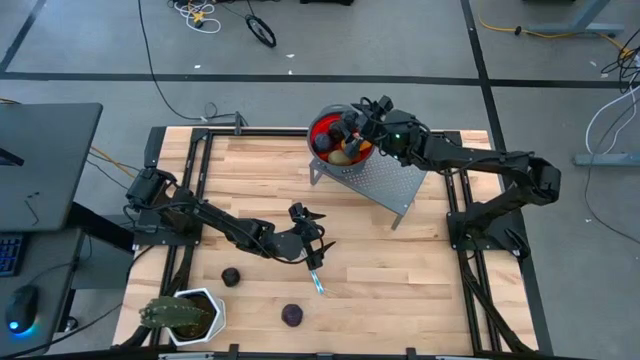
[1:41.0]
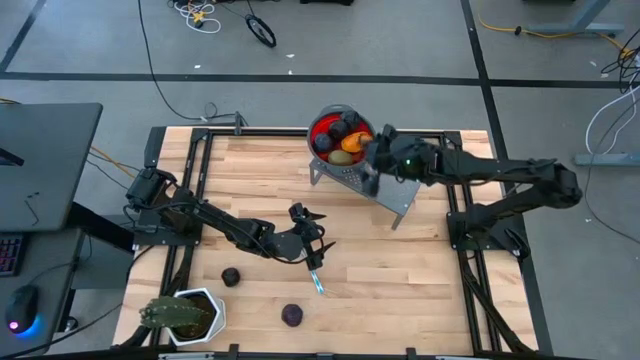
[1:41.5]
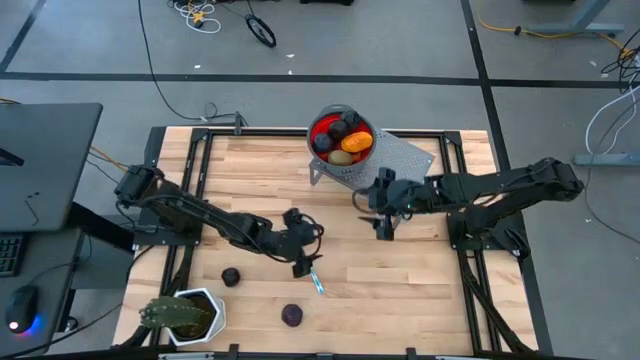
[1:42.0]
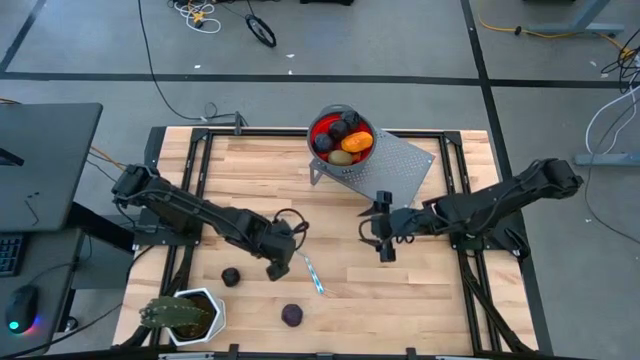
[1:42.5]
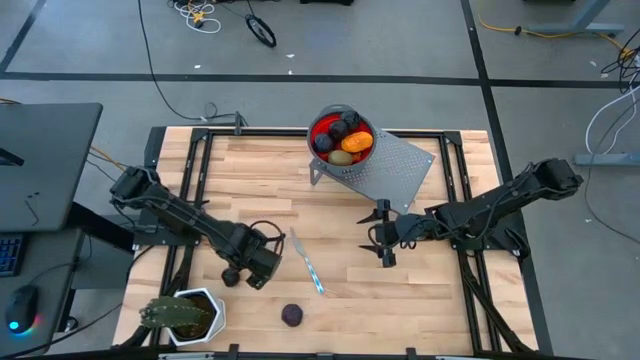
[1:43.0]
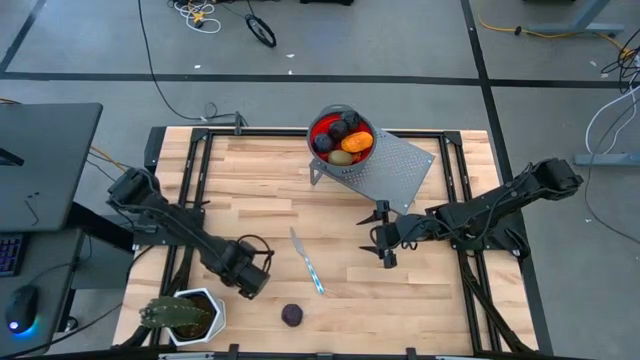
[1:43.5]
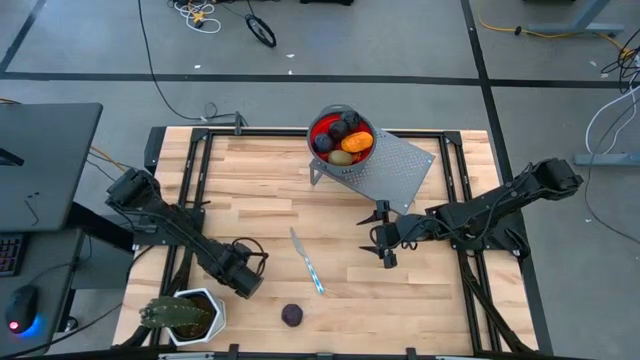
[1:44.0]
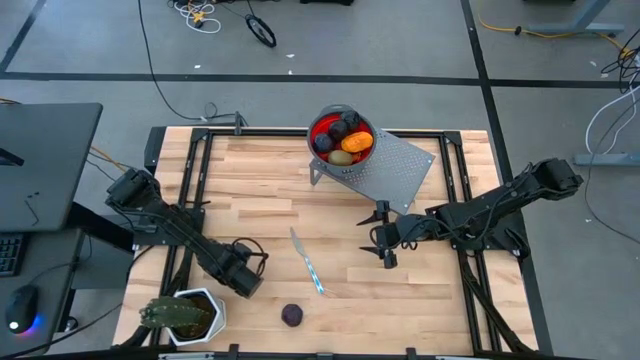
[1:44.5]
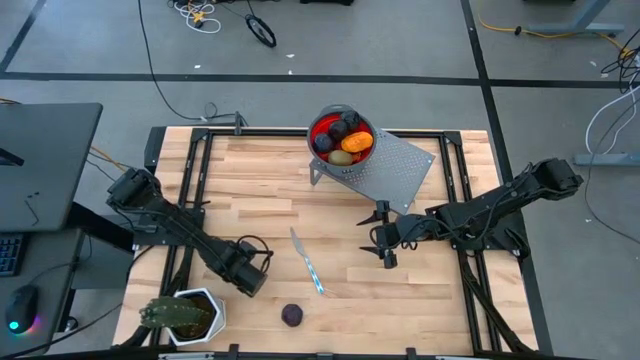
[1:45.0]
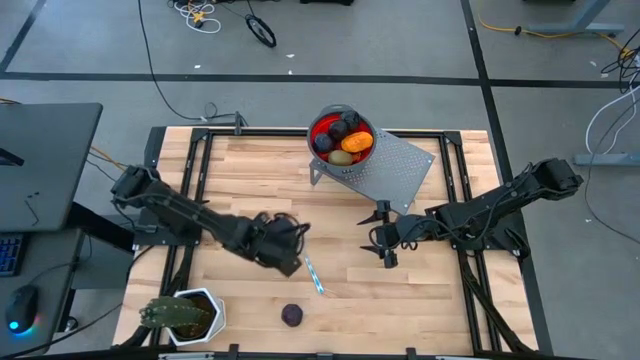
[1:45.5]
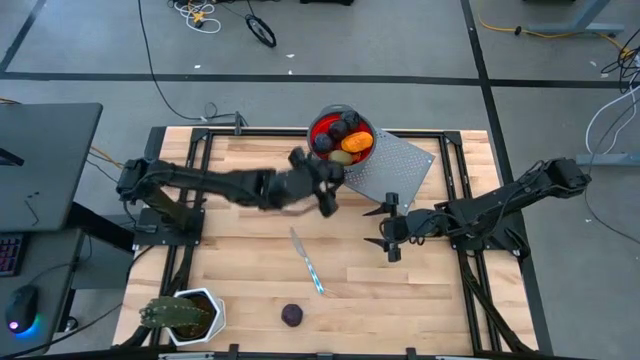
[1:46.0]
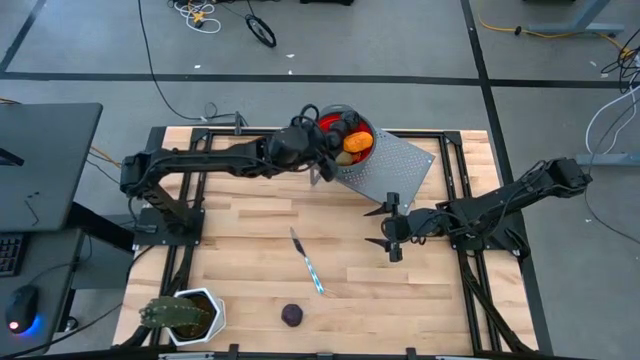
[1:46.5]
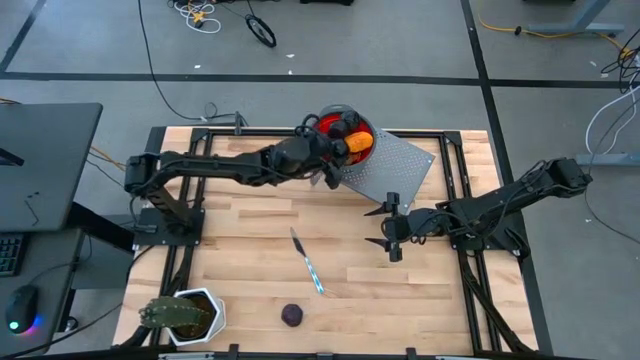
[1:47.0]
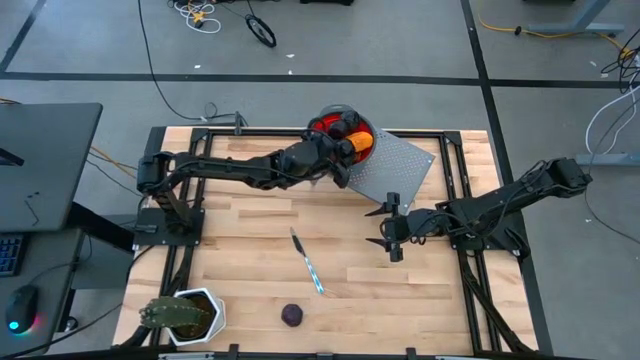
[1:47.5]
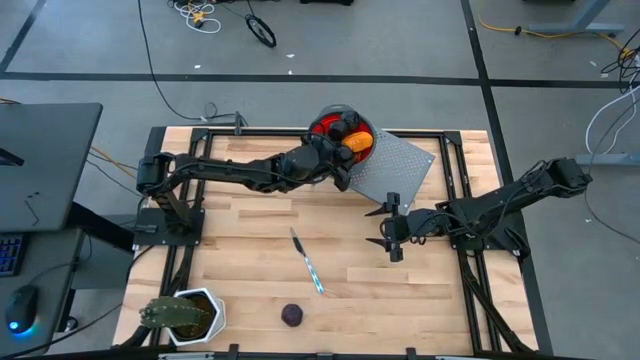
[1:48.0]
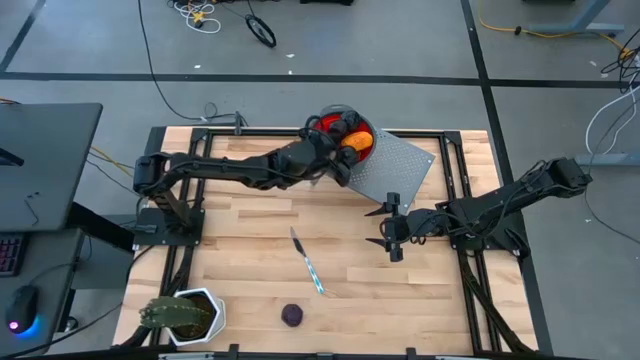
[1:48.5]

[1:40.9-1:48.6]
Task: Pick & Place Fruit
Put the mangosteen into the red strainer bowl

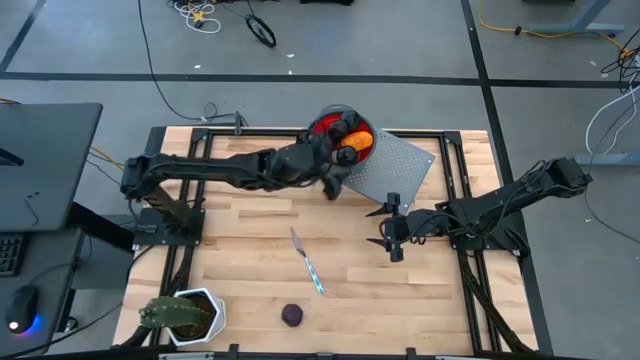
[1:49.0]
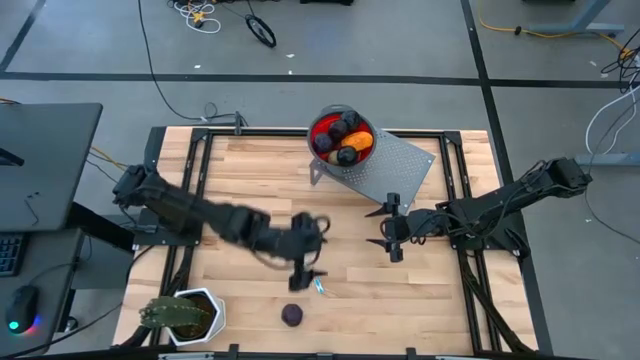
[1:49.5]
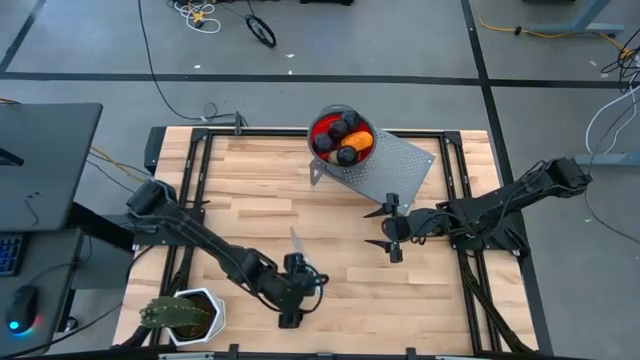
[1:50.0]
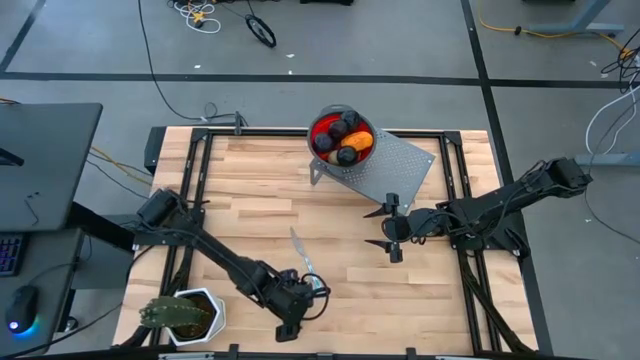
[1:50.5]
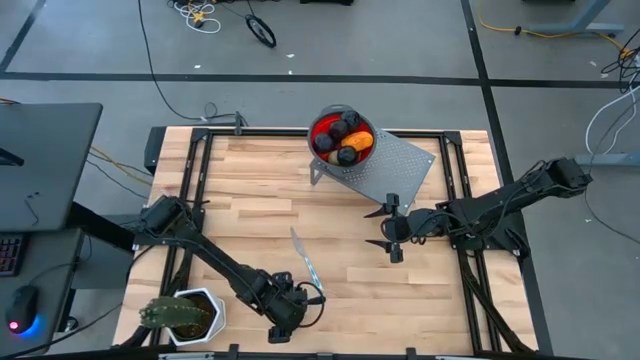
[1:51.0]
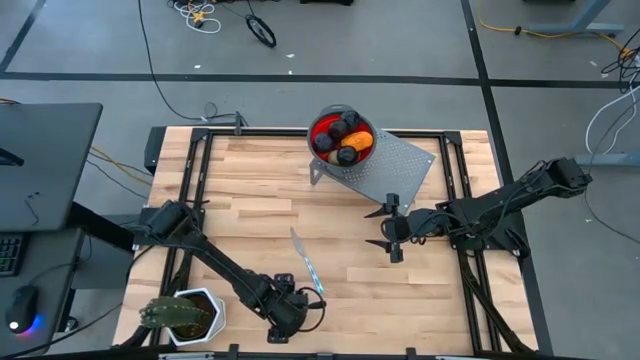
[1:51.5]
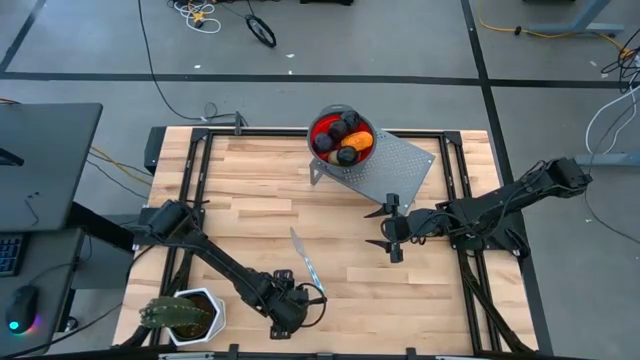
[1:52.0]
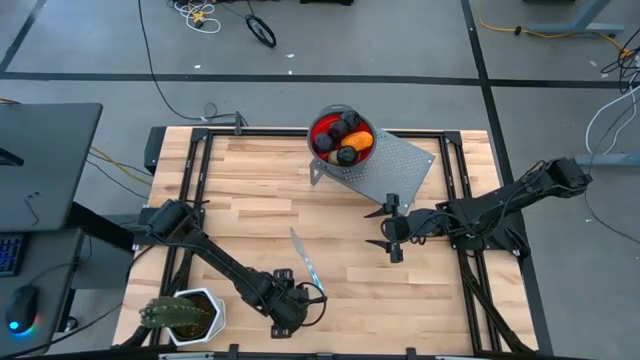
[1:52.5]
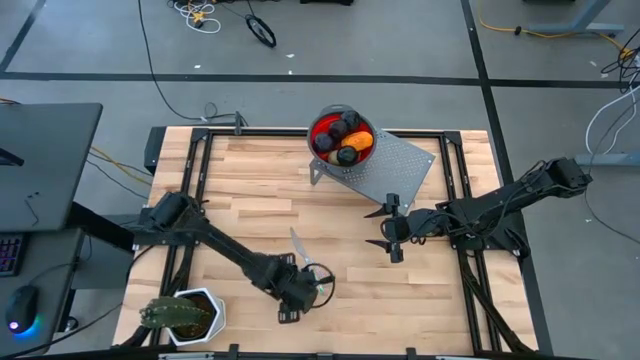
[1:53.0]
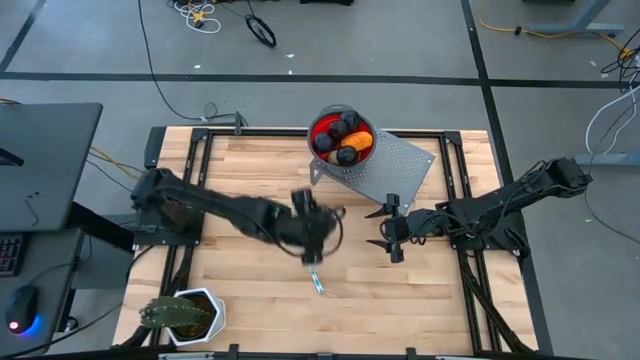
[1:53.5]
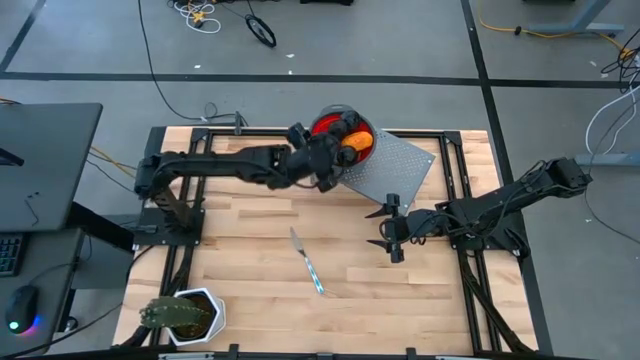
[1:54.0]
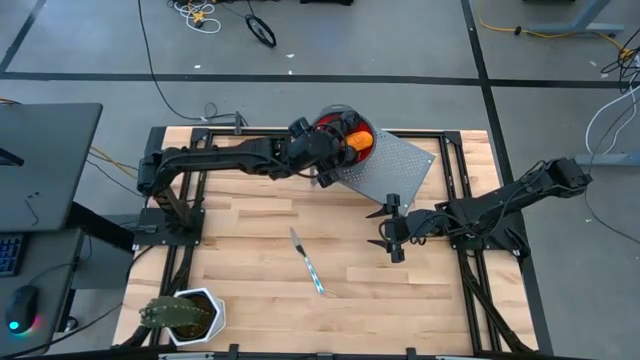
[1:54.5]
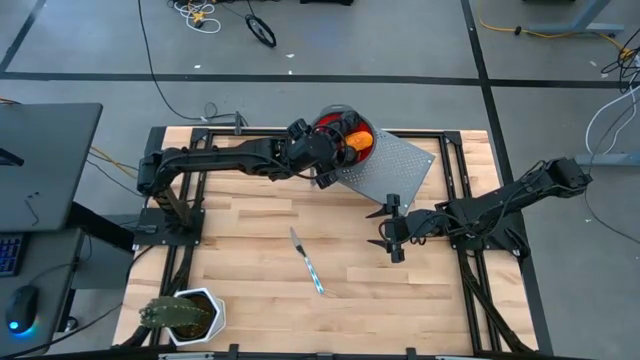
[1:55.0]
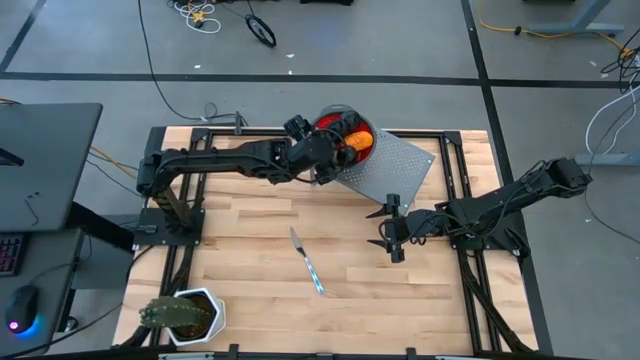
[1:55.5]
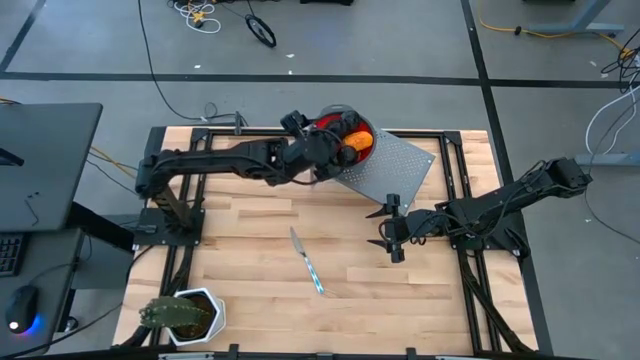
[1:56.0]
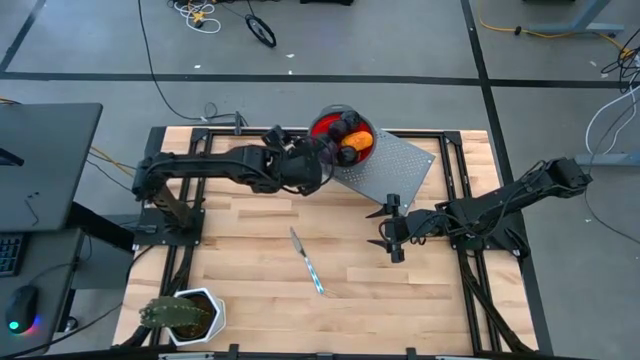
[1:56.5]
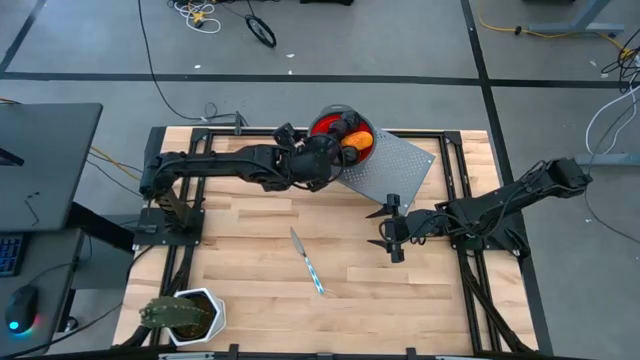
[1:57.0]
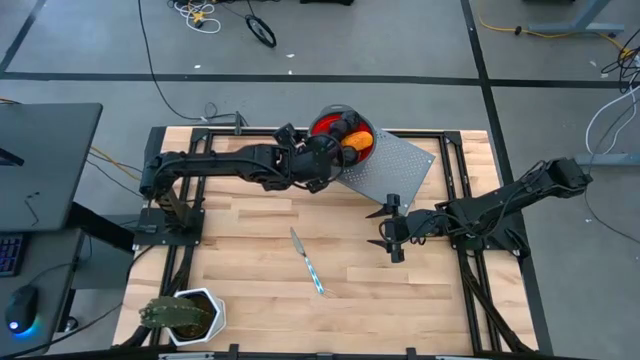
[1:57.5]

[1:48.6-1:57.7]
Put the mangosteen into the red strainer bowl

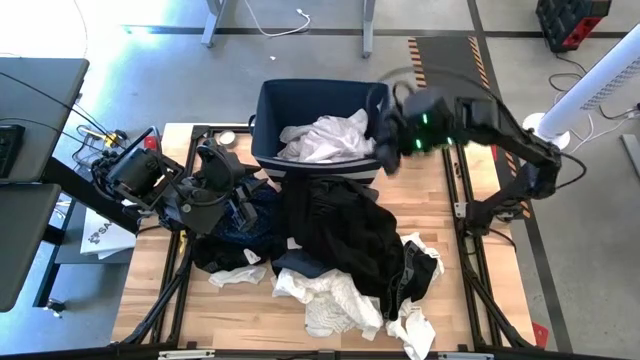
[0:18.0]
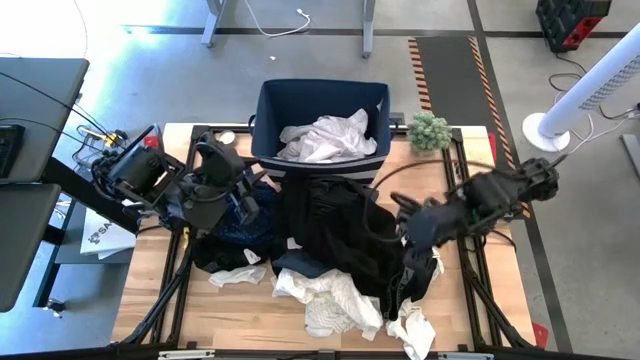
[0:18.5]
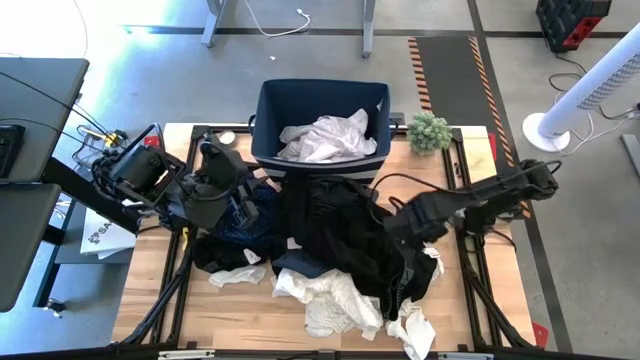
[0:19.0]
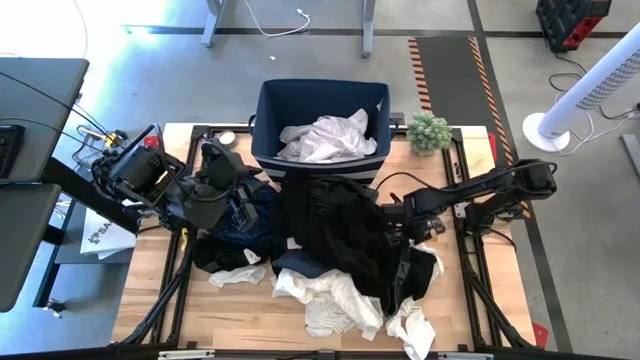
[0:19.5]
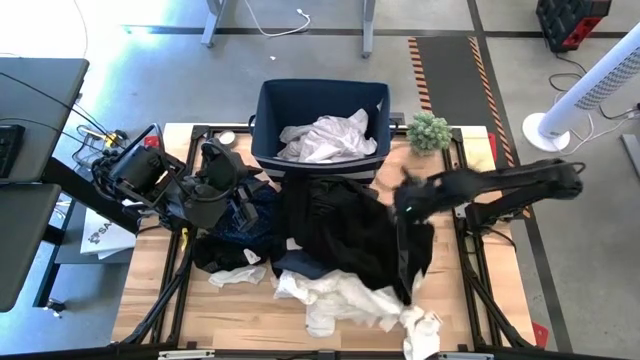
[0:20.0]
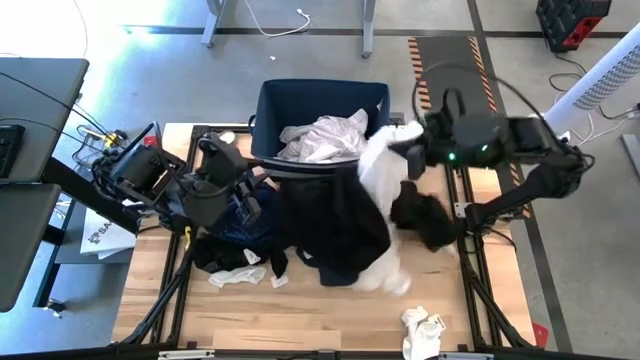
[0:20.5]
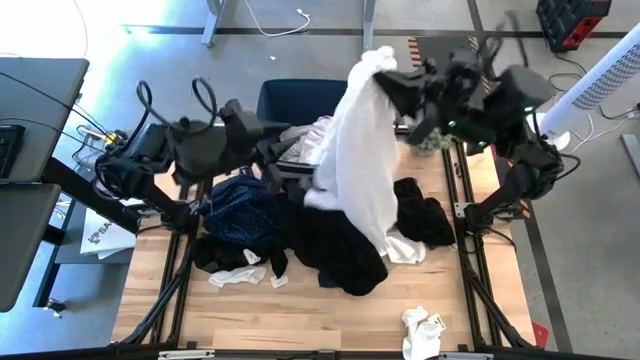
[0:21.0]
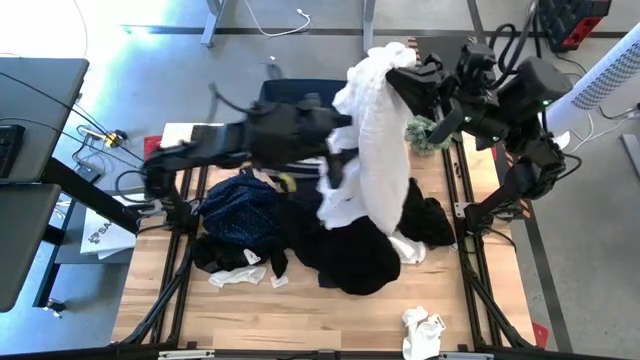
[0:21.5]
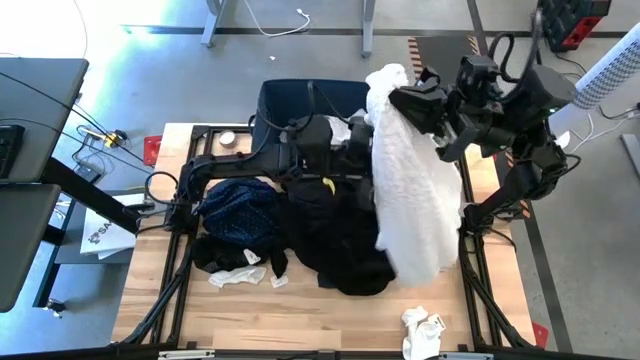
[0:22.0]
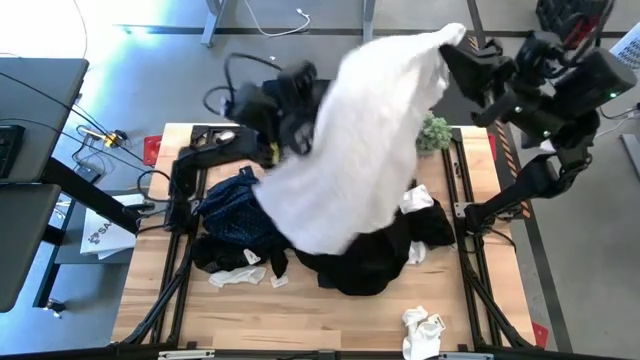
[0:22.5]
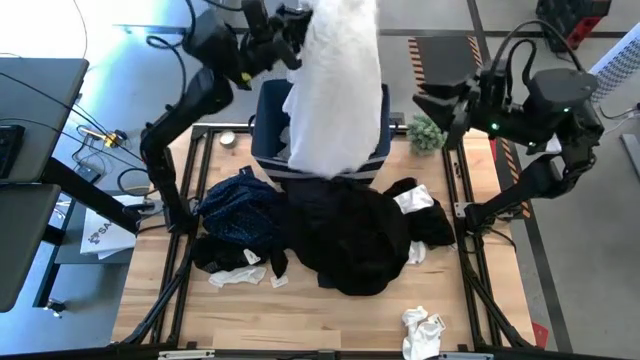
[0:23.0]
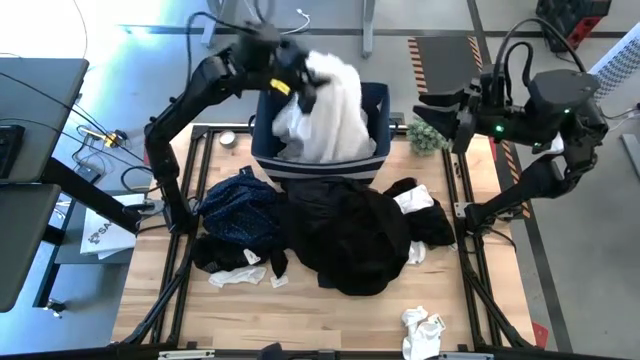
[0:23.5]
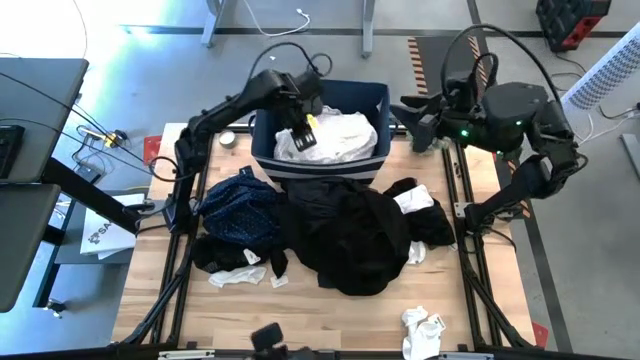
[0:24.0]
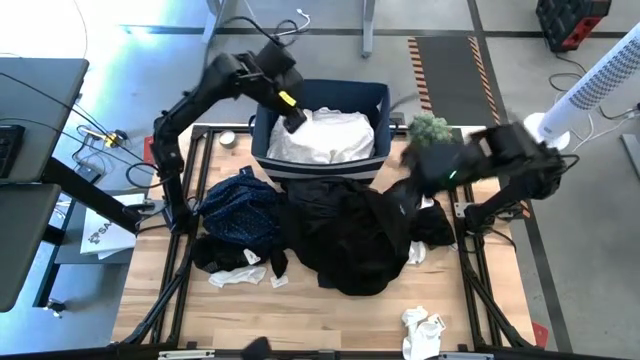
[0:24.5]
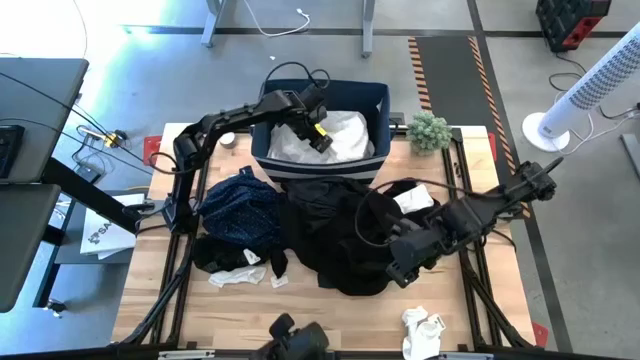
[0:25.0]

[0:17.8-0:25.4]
Task: Sort clothes
Put the white shawl into the blue bin
